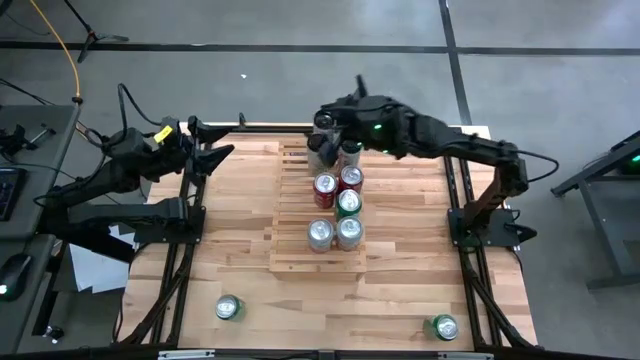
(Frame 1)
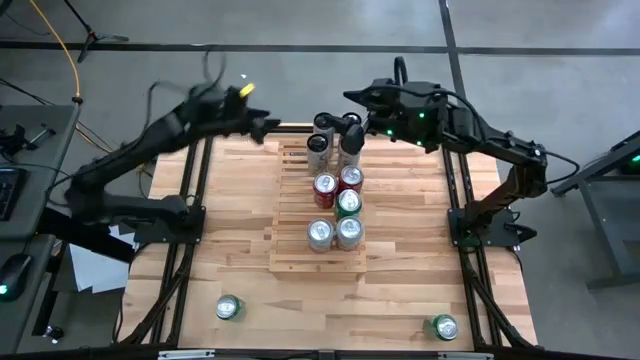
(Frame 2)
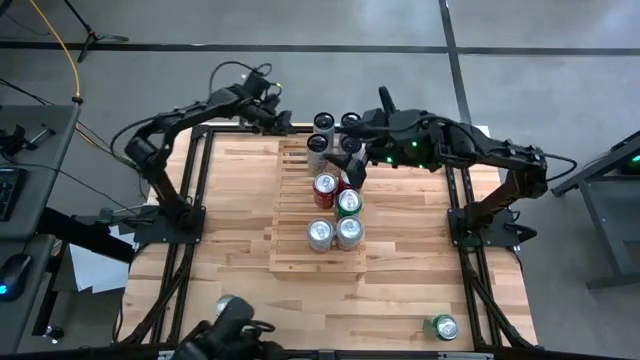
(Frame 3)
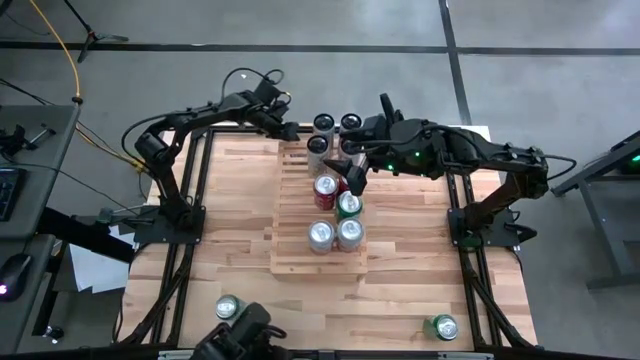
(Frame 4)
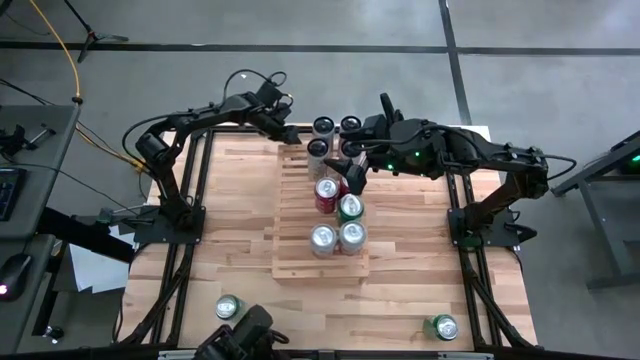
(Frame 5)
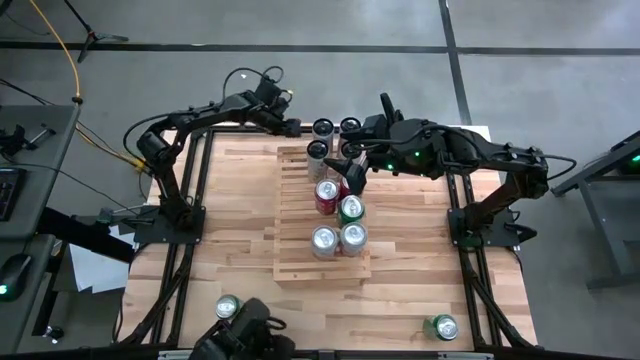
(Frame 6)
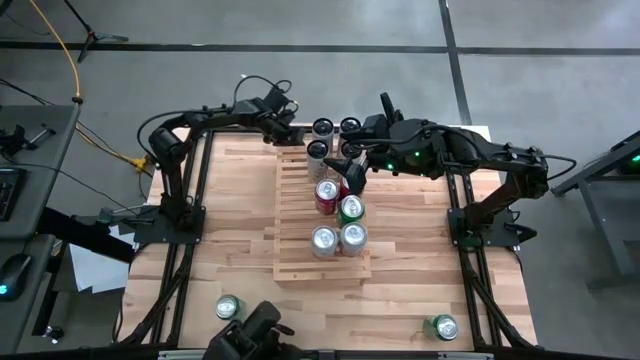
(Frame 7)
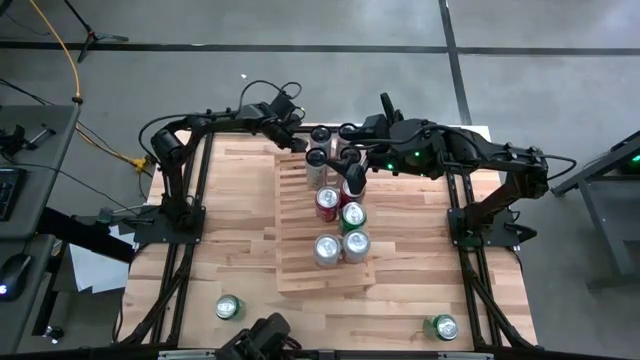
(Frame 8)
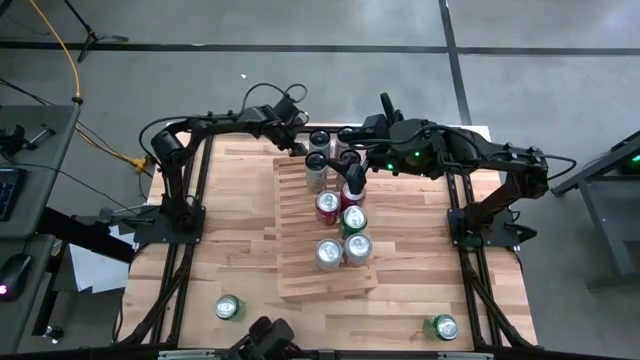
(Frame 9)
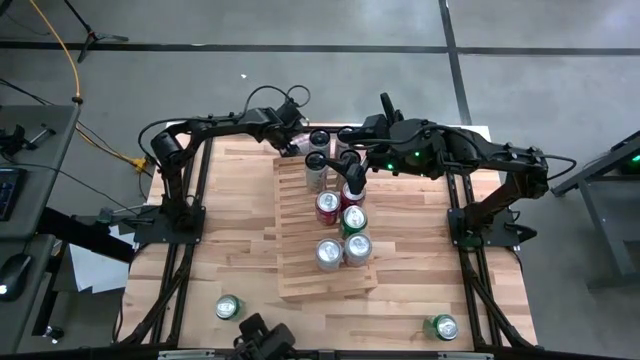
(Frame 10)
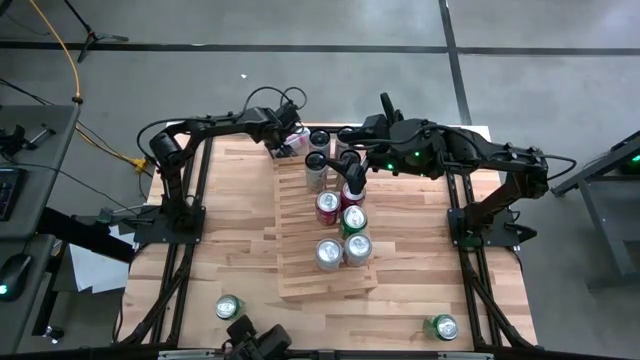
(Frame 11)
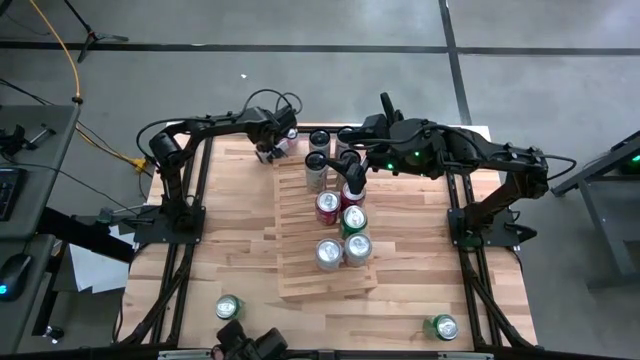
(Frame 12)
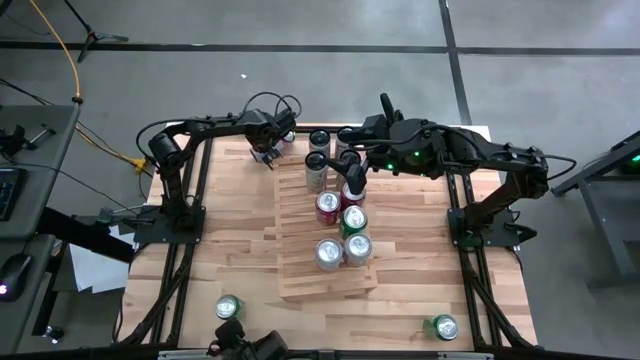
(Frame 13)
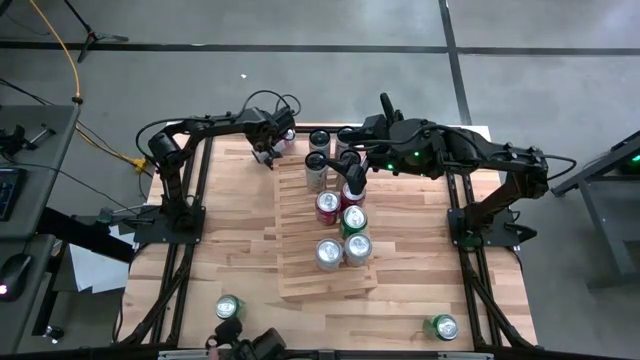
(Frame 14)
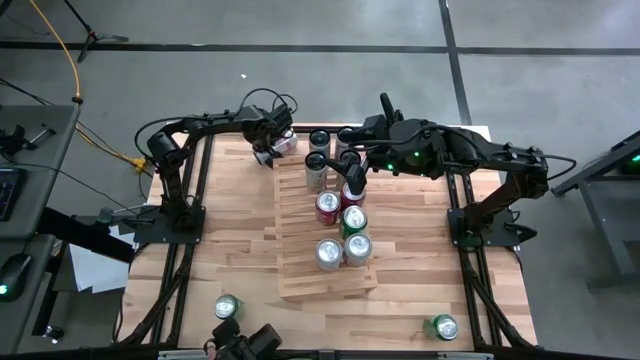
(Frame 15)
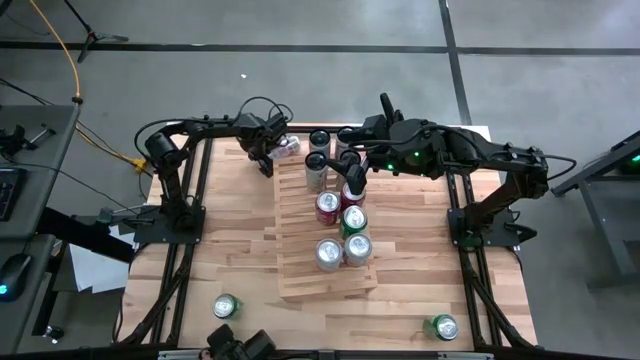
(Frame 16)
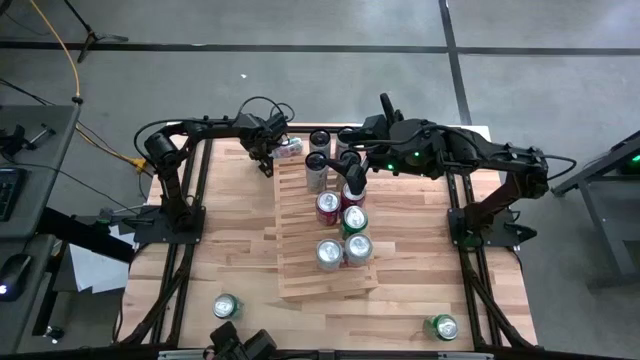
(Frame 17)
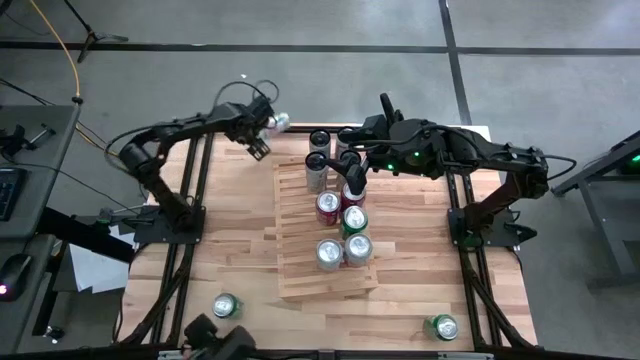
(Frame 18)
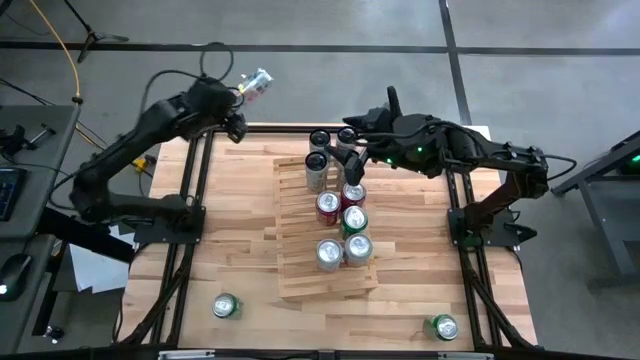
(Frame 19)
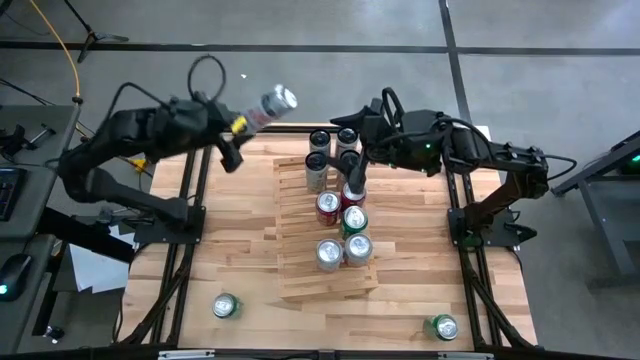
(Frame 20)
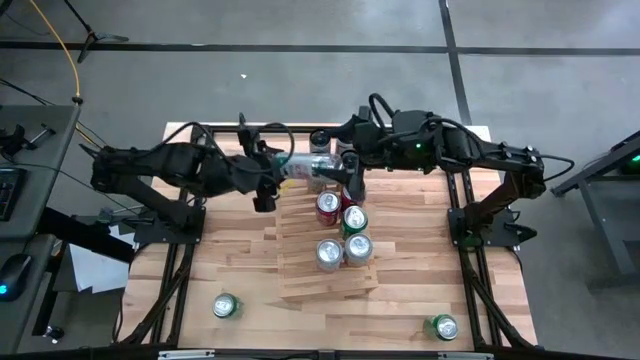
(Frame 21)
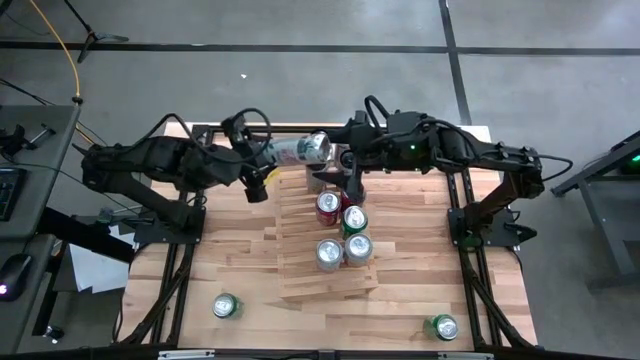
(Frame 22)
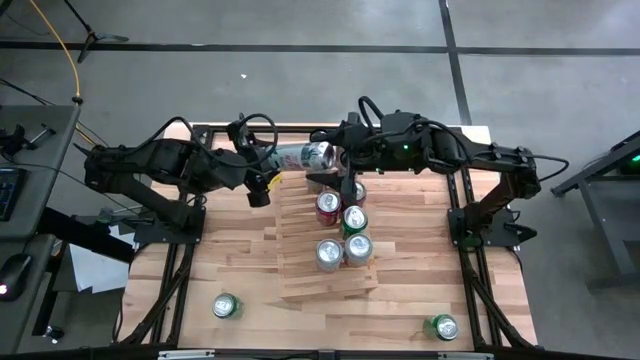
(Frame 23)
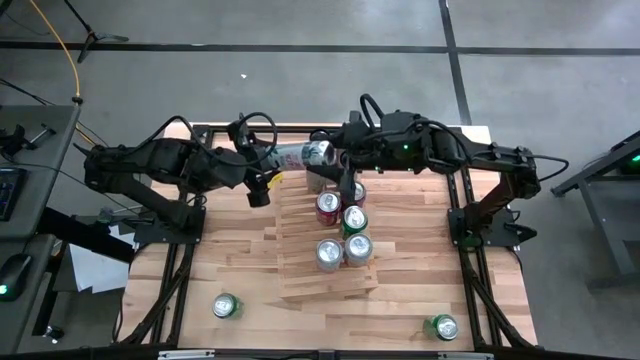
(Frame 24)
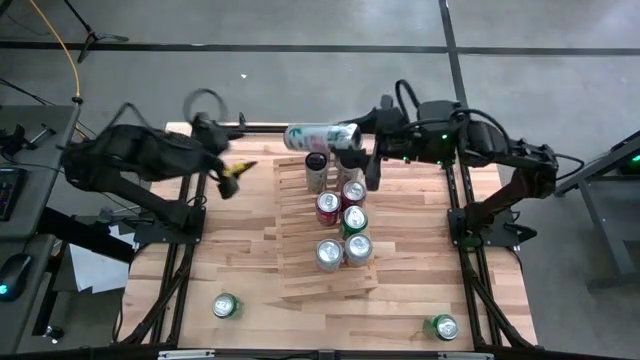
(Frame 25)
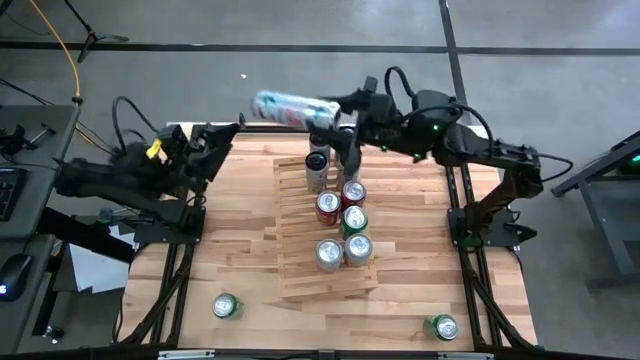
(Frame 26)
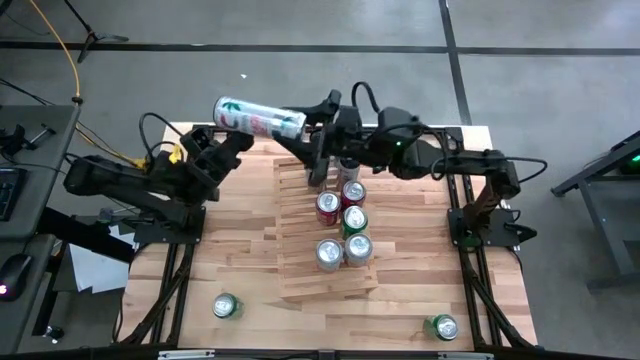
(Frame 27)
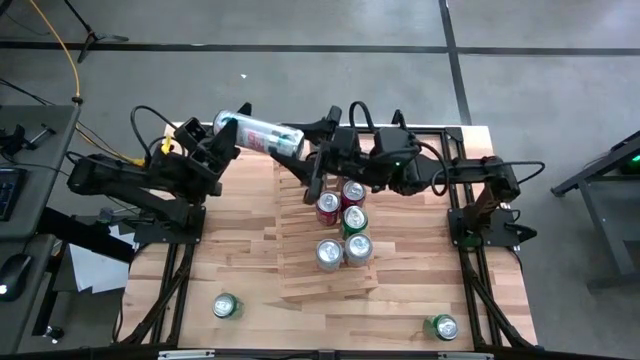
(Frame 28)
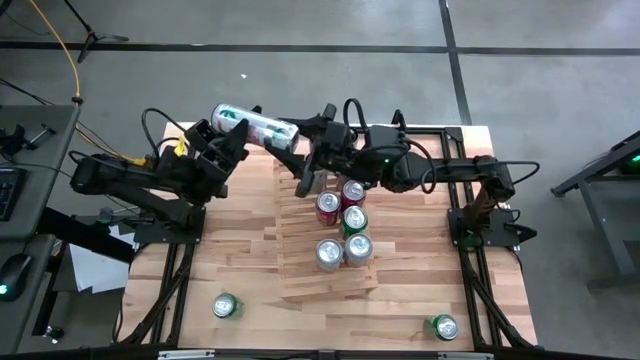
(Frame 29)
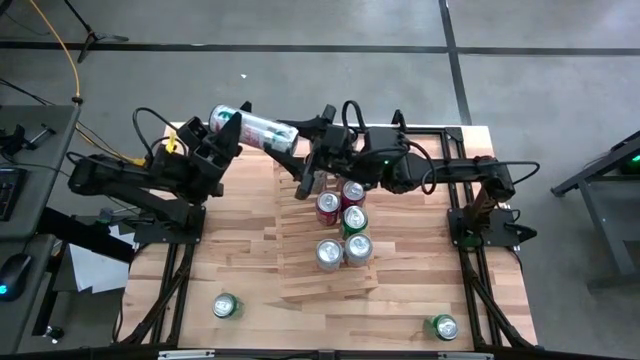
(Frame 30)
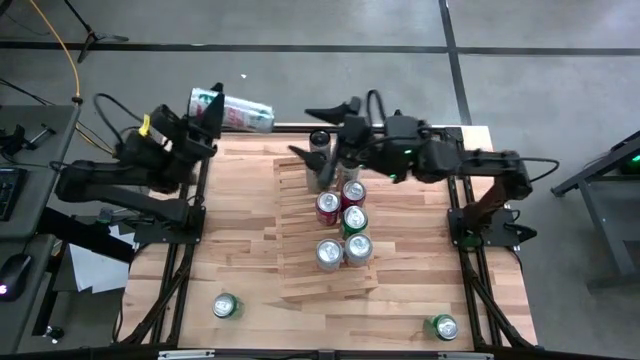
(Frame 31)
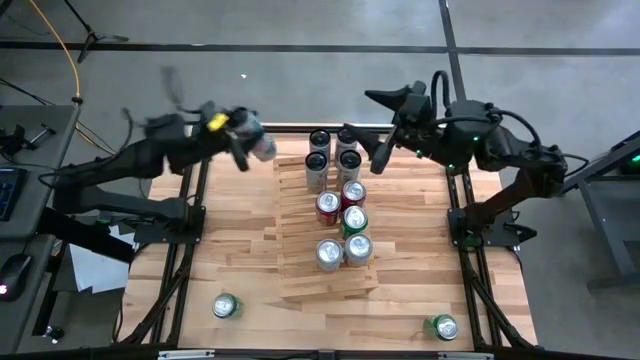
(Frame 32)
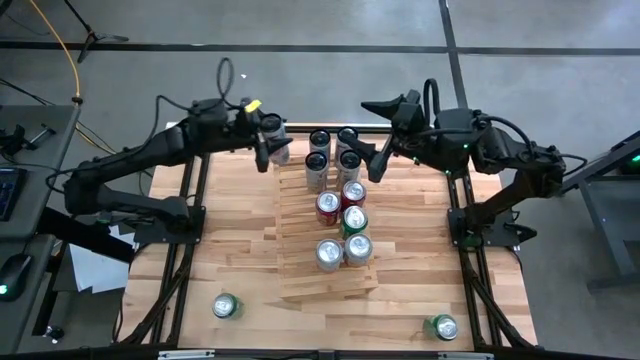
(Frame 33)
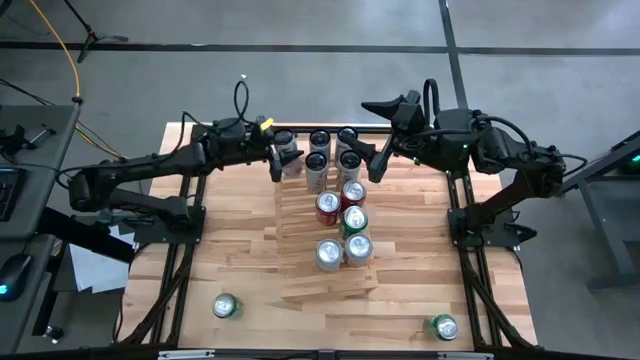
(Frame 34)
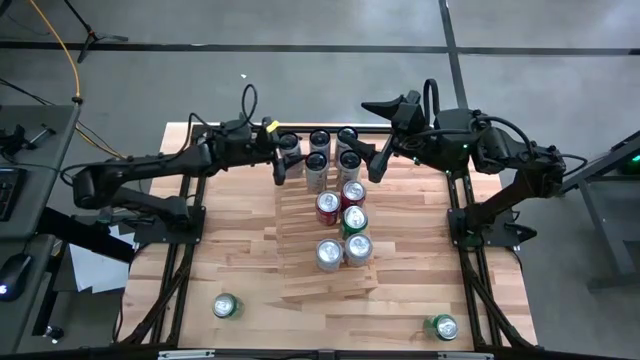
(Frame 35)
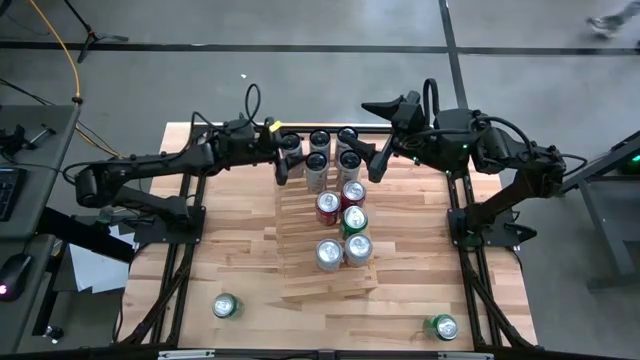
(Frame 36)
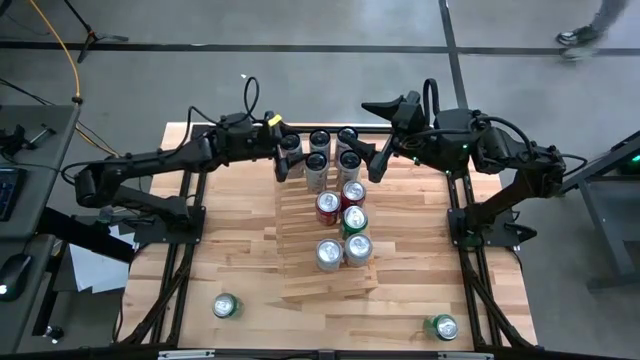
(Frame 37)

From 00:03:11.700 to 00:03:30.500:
Task: Place canned beverage on shelf
Put the white pink can on the shelf
